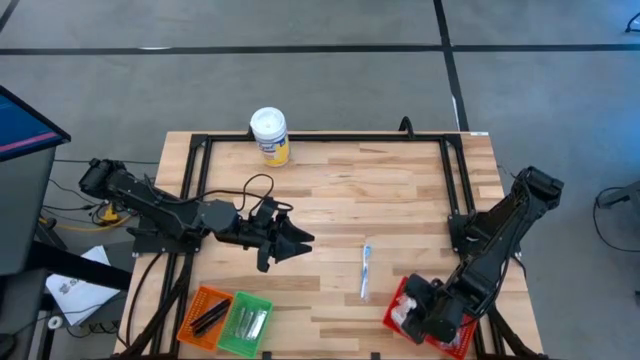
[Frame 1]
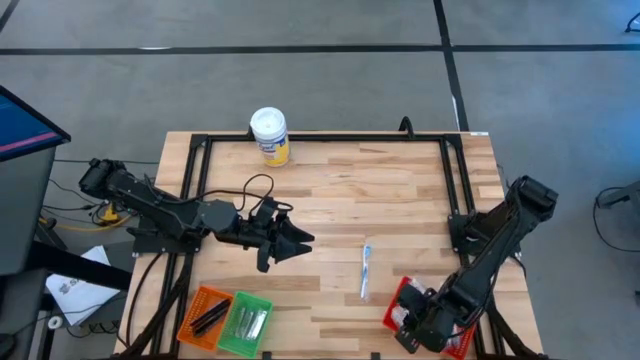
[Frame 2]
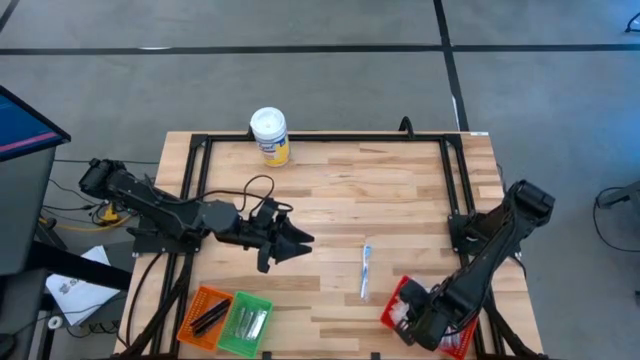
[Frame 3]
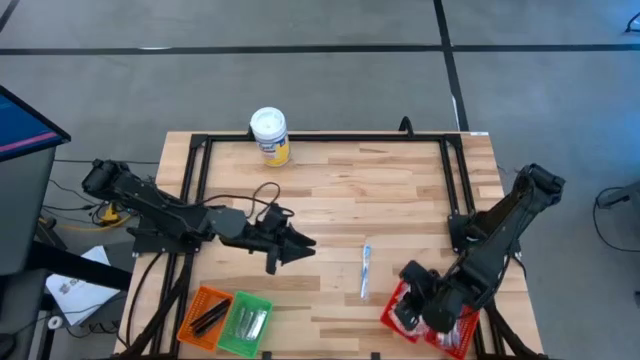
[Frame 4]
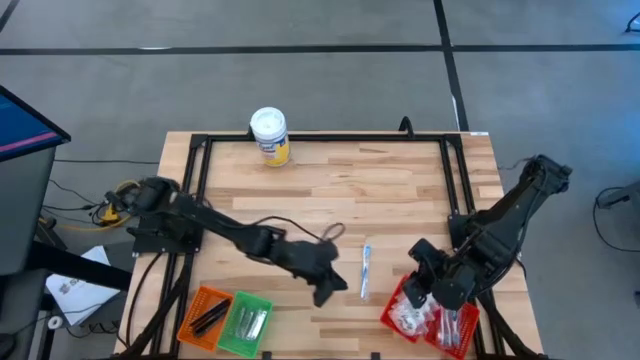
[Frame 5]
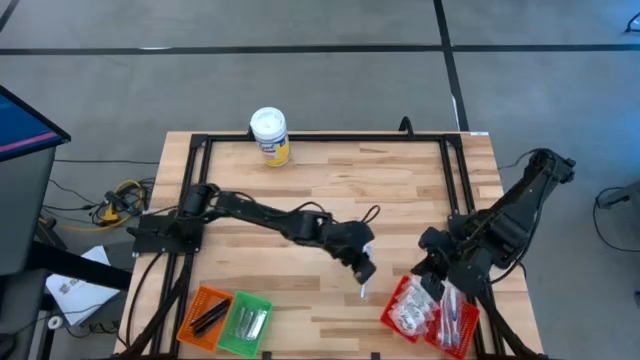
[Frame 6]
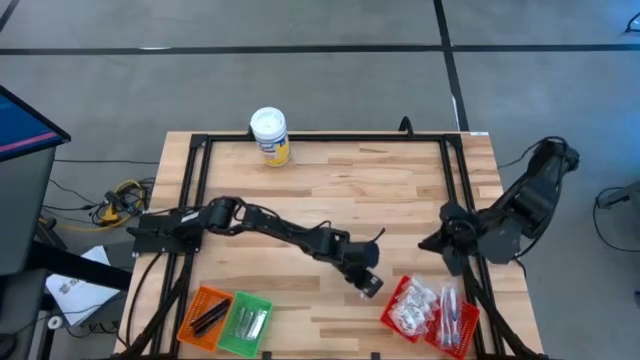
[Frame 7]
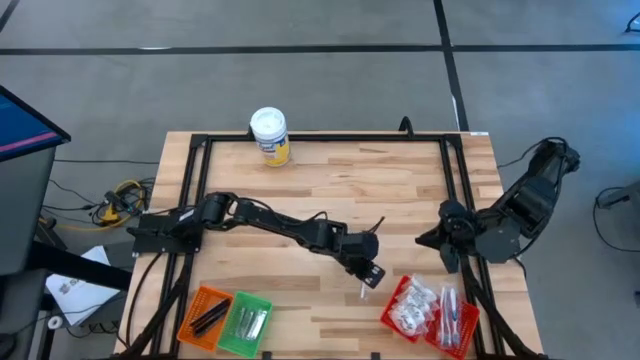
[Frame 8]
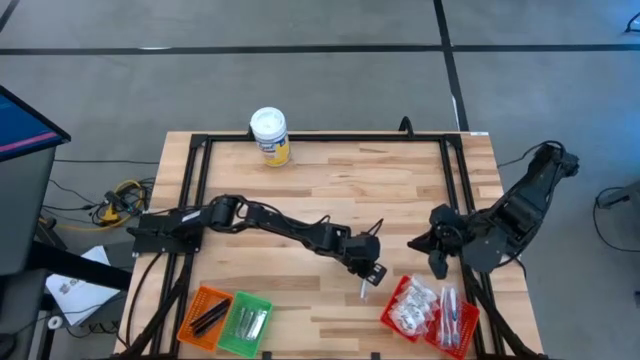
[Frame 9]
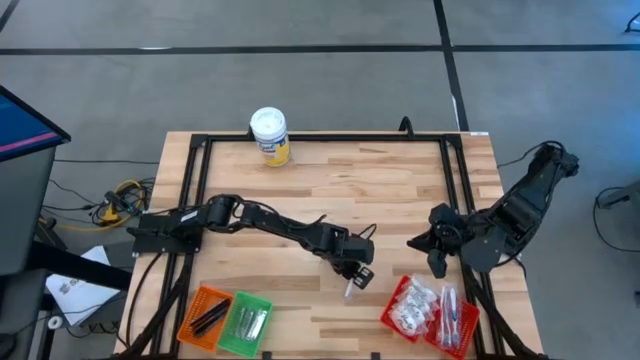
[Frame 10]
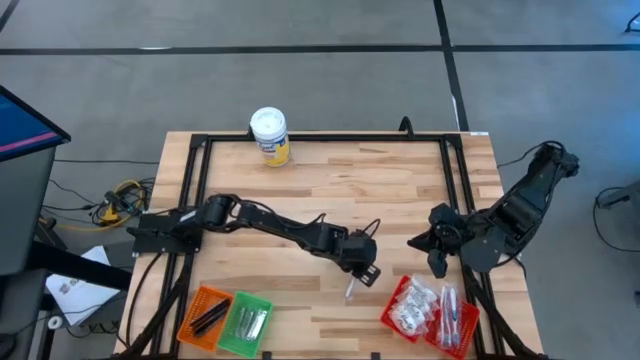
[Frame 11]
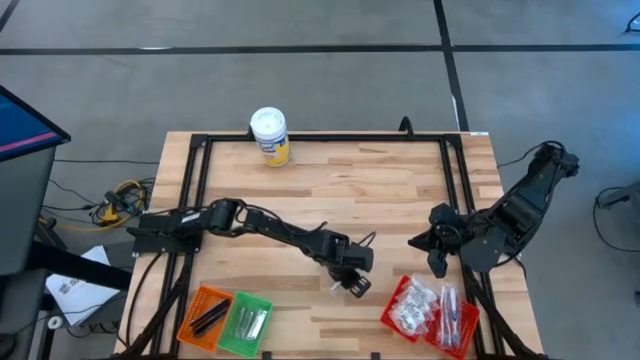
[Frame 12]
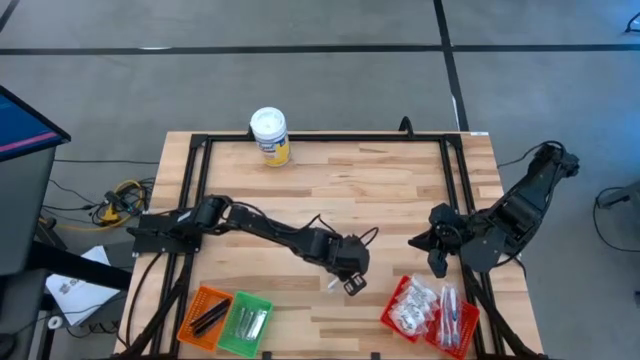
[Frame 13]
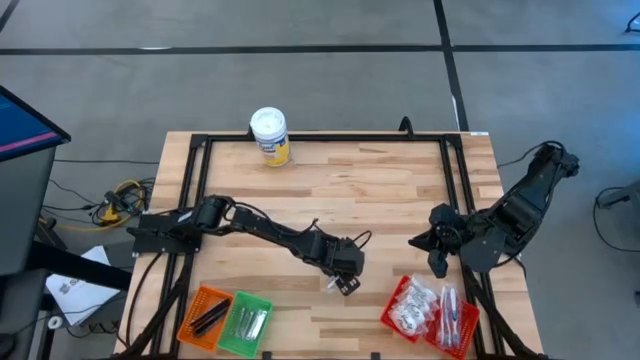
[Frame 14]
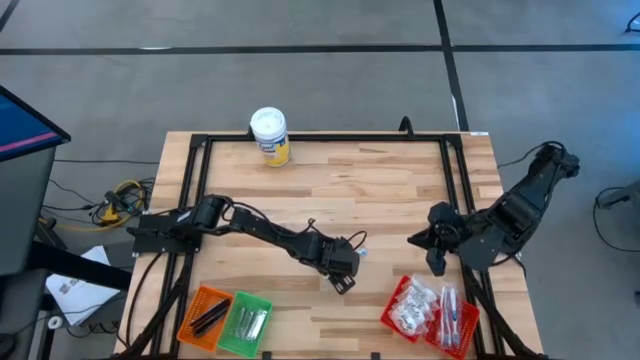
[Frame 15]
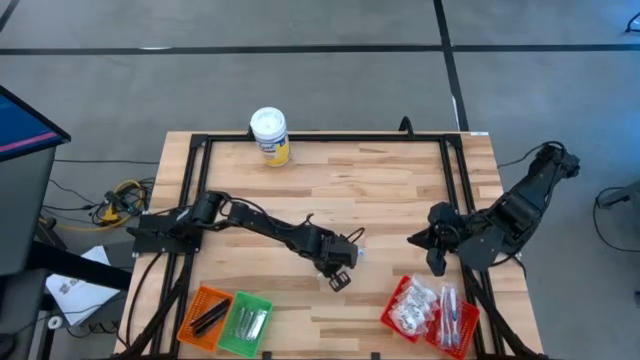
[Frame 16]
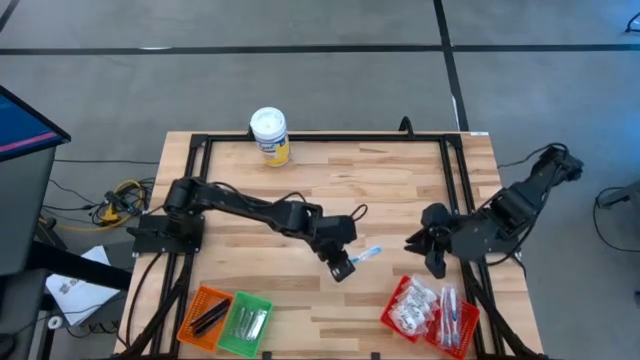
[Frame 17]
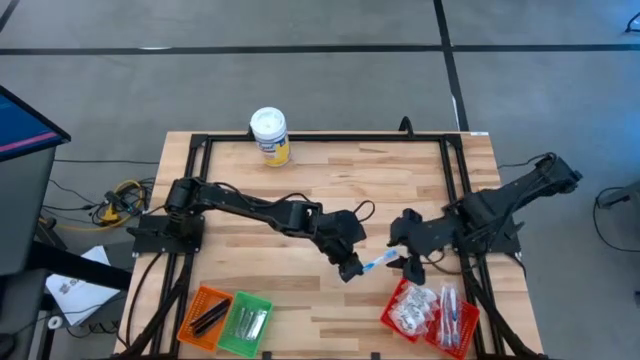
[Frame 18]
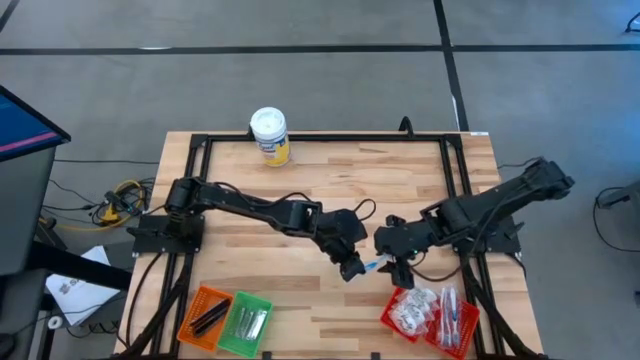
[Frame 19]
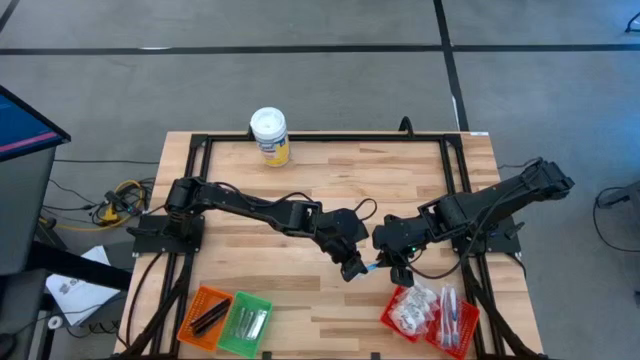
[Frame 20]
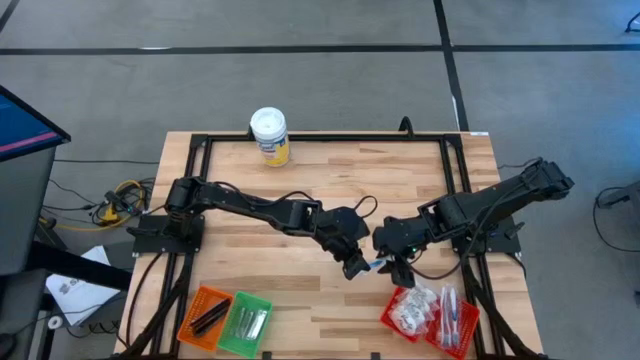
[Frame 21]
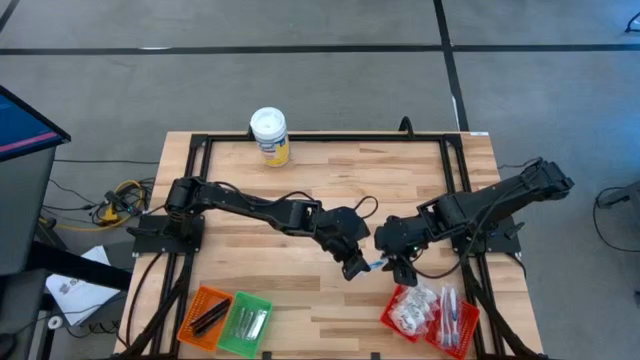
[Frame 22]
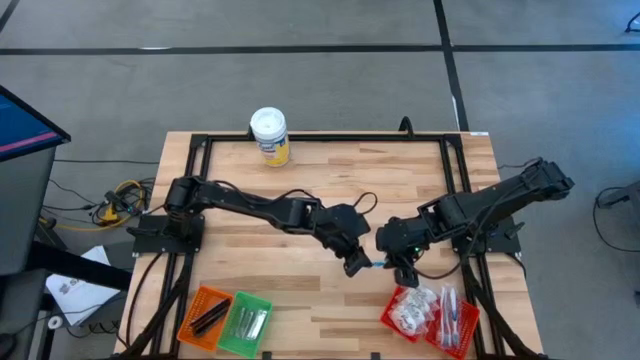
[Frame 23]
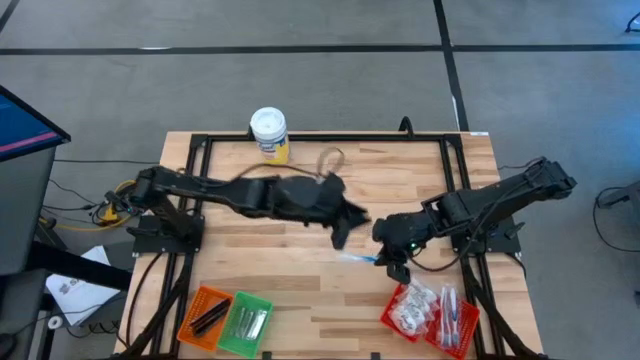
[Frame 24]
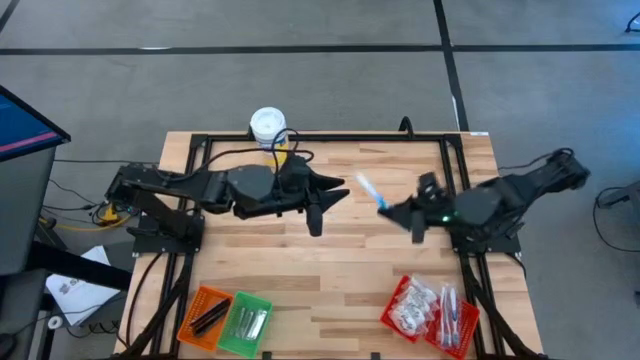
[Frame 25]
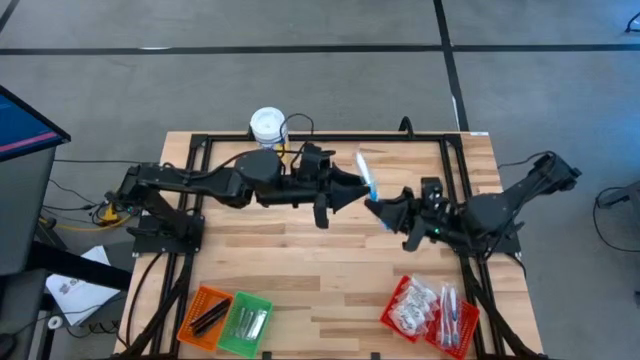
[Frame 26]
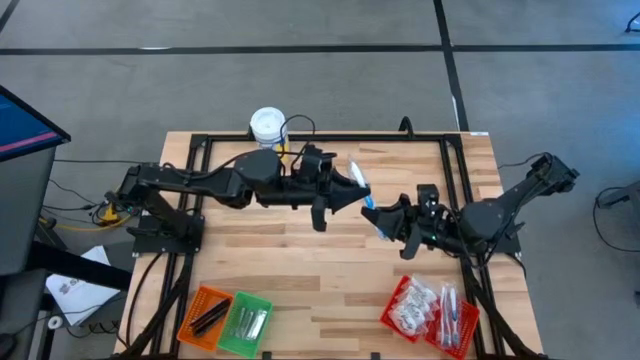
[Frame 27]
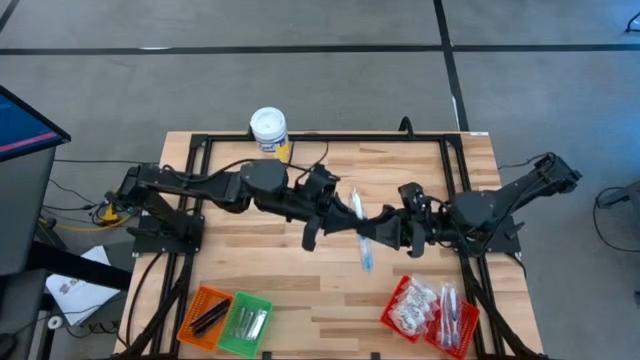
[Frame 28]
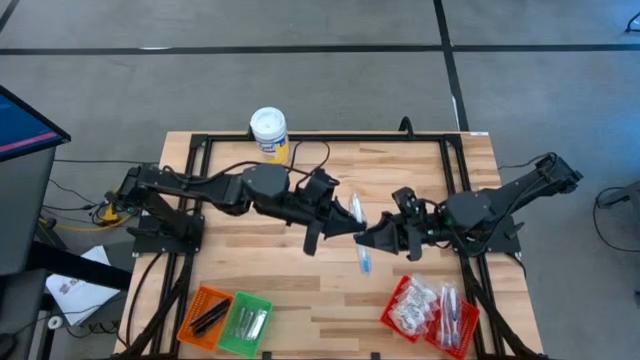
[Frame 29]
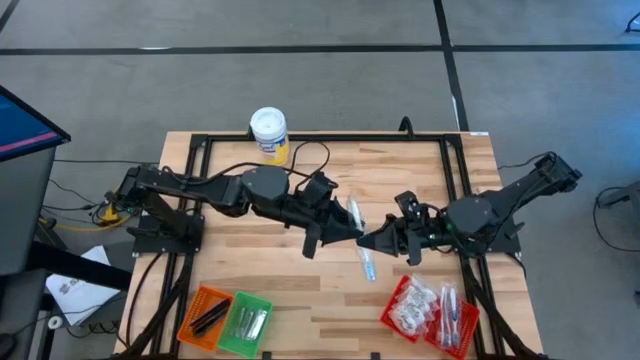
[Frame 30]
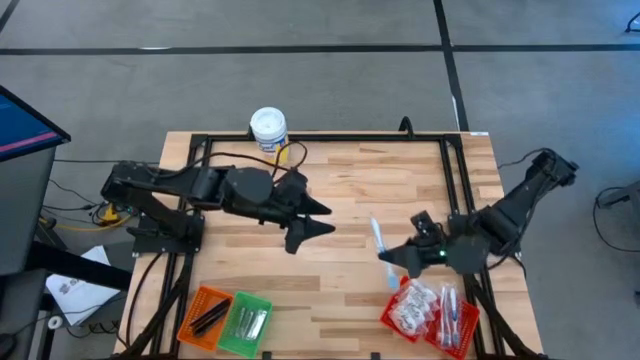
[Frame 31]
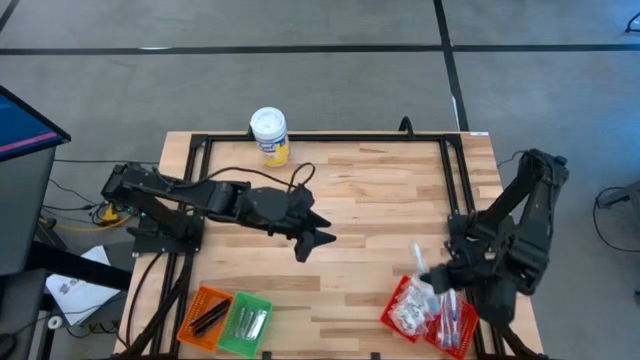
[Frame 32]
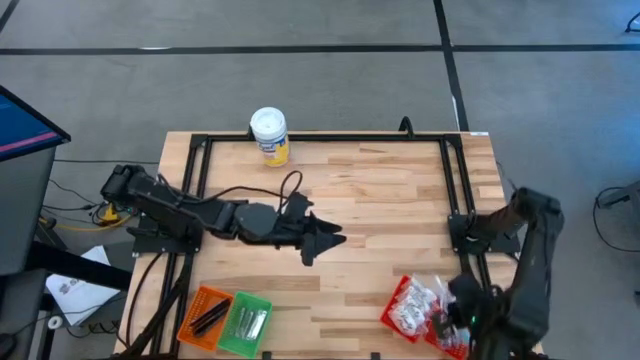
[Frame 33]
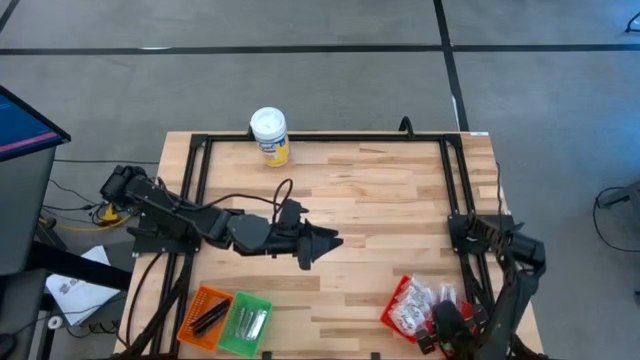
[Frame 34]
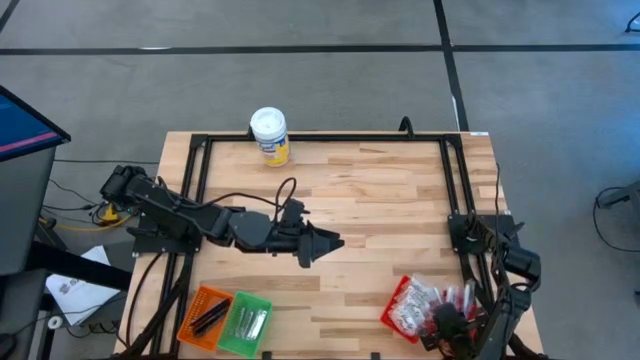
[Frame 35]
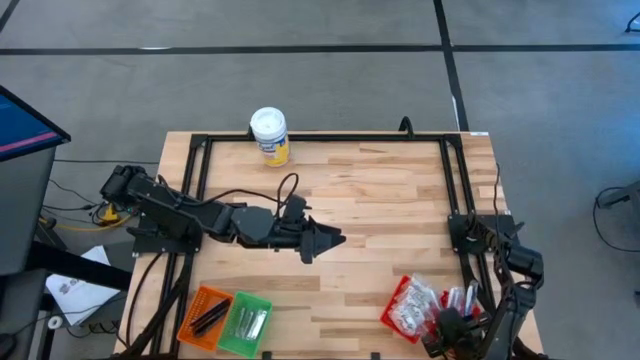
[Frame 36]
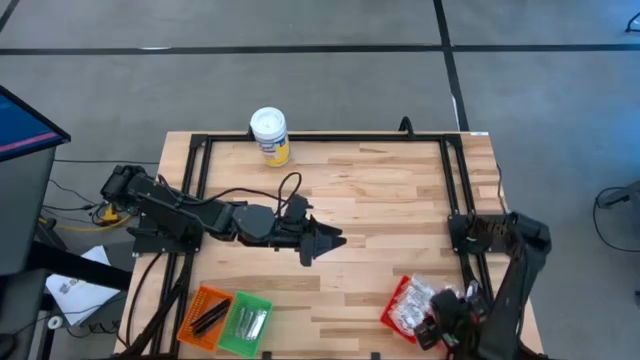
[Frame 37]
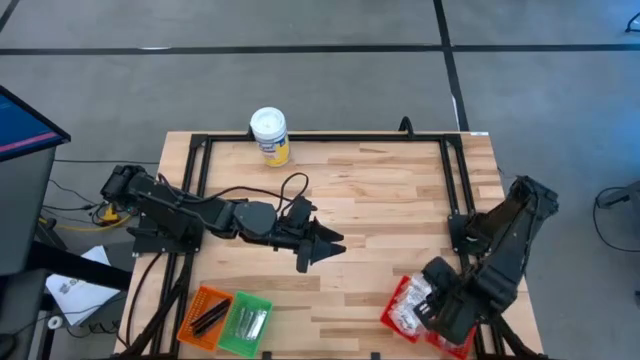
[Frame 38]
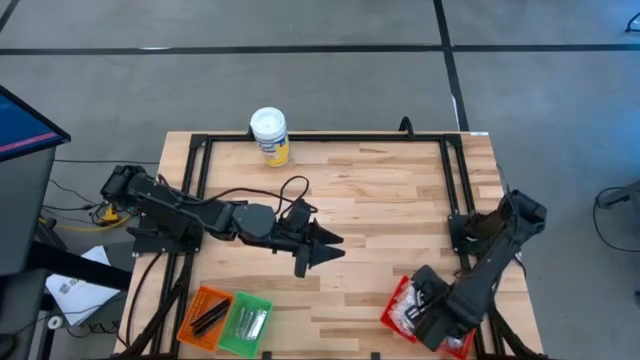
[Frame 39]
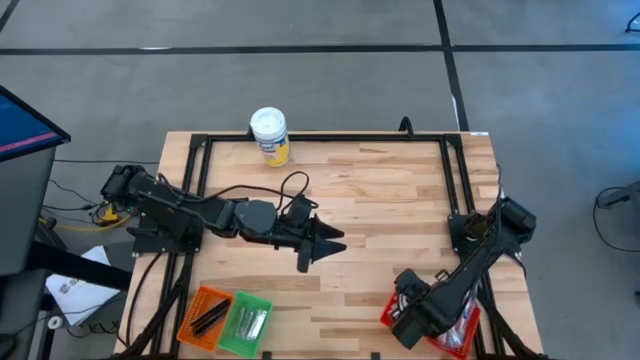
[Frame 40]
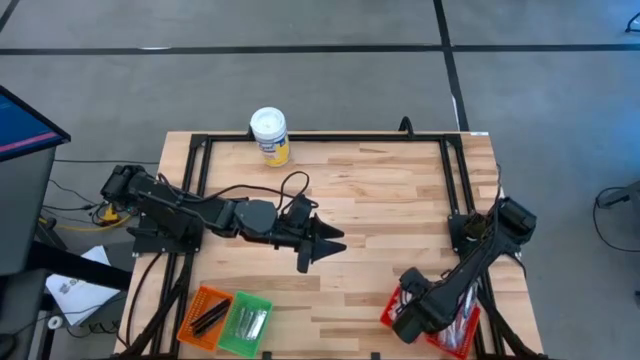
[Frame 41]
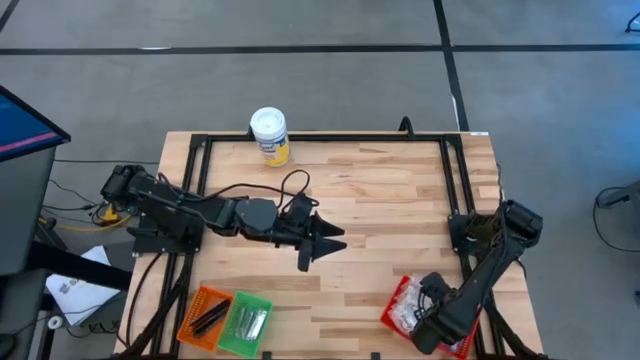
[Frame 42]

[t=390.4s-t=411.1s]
Task: Pick & Place Travel size toiletries
Put the blue toothbrush into the right red basket
